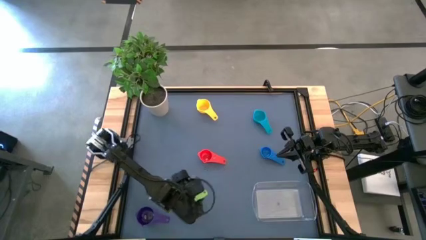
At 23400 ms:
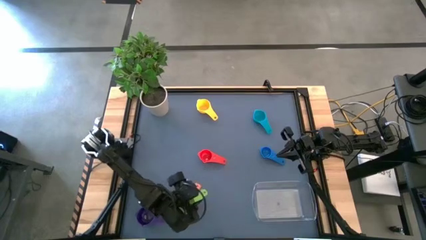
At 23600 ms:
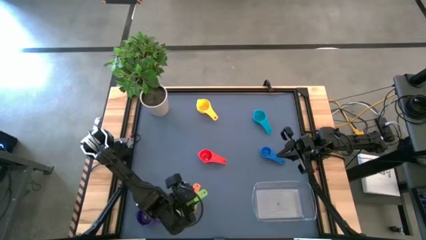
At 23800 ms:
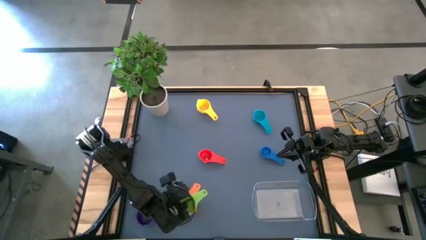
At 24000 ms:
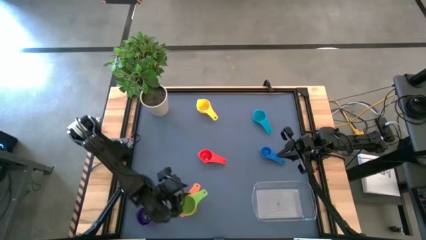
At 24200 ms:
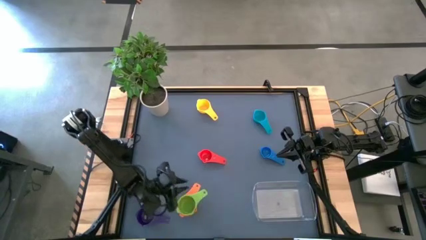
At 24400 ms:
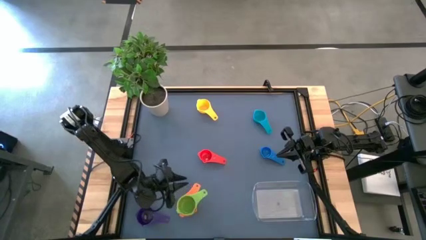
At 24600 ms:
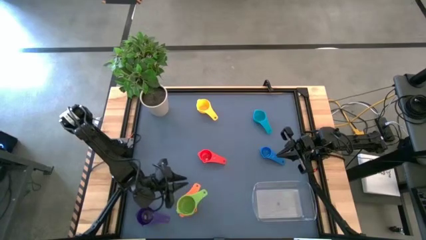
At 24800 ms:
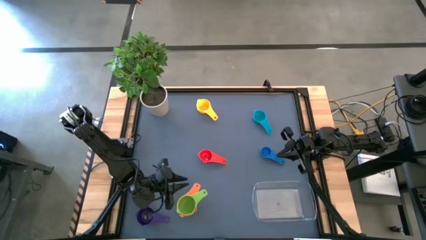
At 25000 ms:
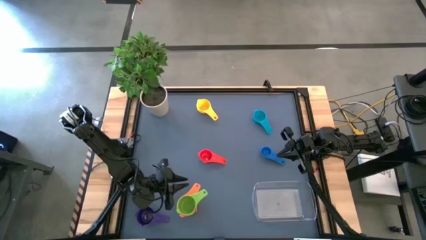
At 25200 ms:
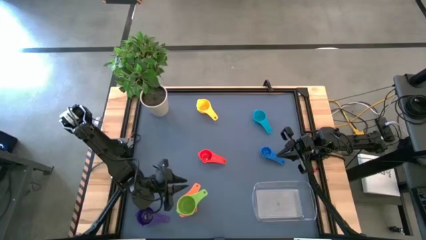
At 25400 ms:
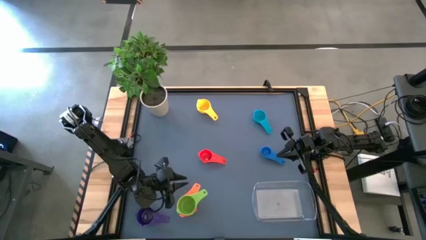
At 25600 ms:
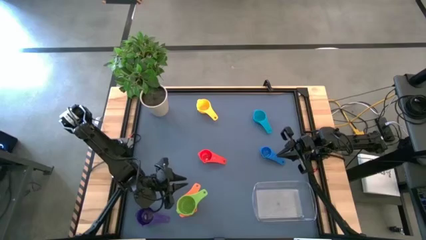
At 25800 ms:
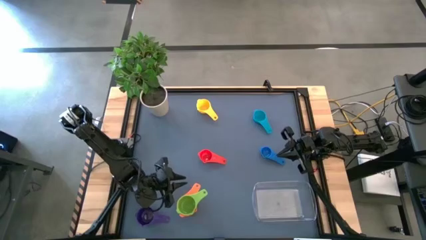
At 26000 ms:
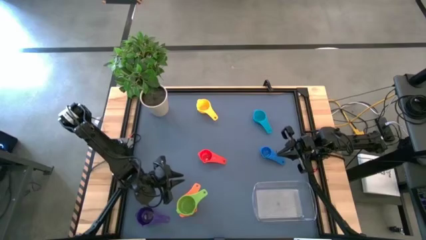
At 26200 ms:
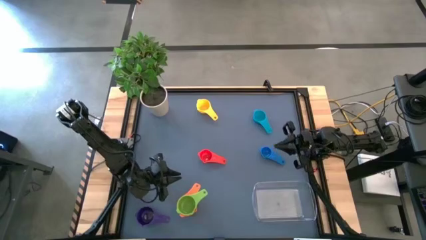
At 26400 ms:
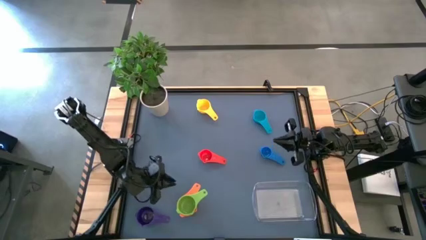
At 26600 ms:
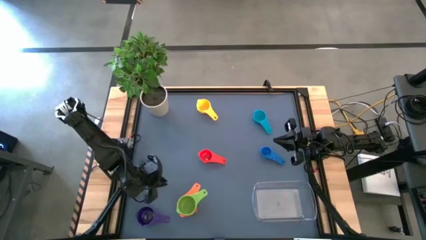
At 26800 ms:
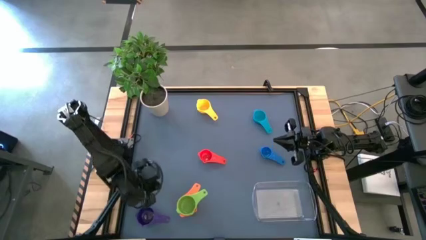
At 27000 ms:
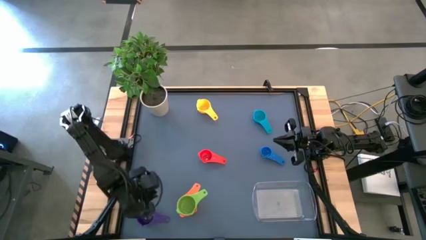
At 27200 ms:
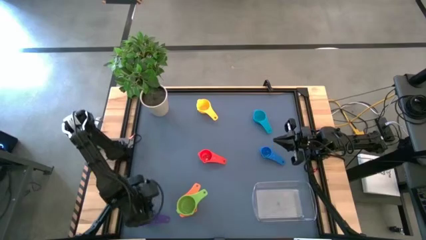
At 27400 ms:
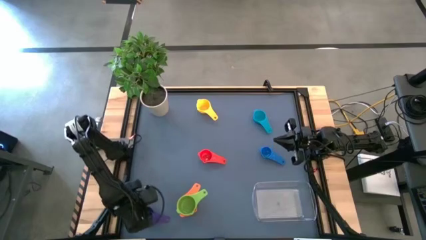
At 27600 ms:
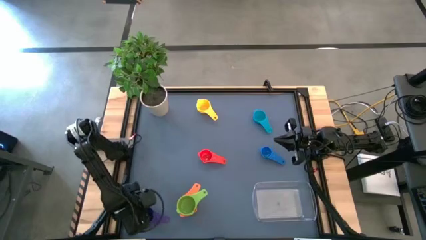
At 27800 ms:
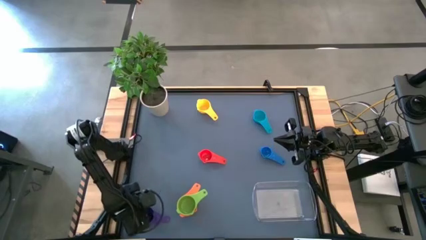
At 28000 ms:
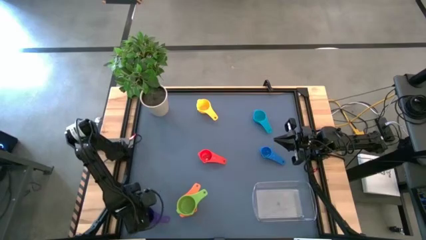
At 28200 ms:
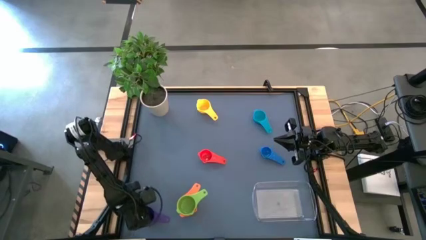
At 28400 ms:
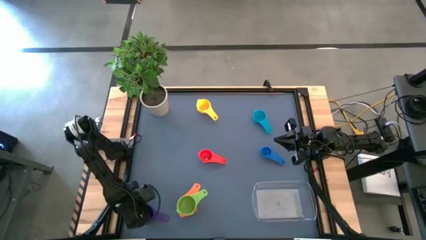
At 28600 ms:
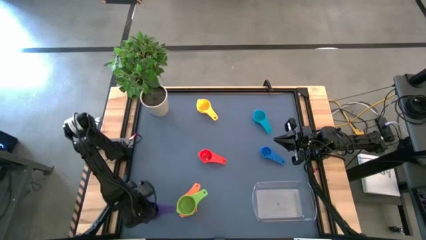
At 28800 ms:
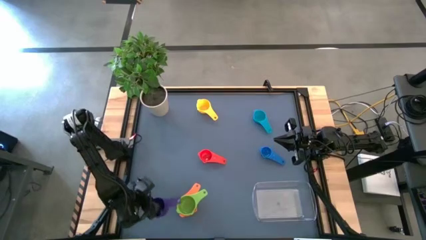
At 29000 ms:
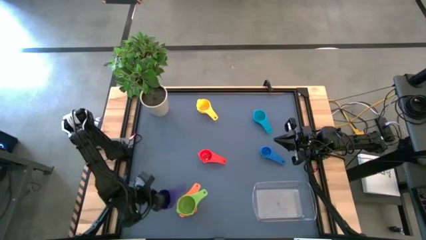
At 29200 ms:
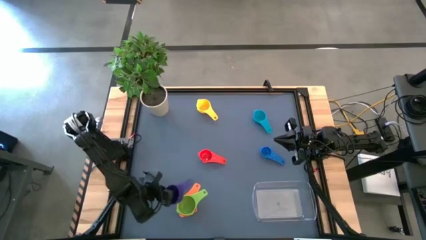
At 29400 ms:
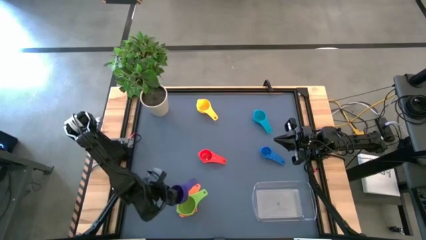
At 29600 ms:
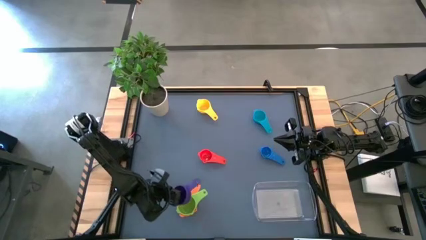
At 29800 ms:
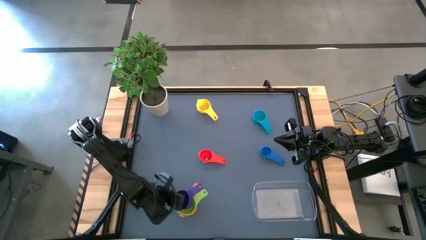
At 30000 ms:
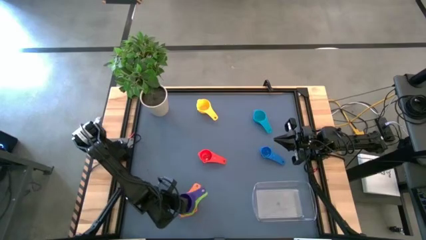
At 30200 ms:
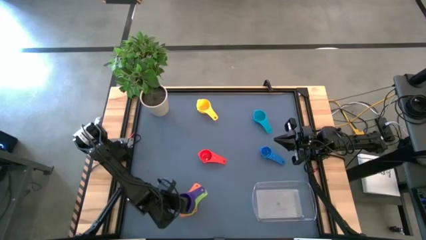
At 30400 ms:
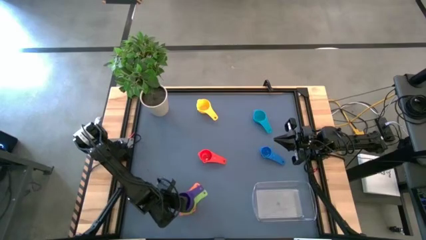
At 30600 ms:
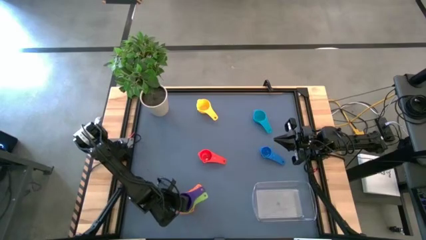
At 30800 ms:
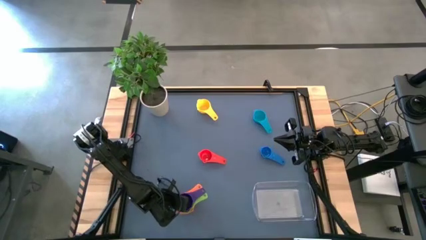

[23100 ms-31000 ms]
Task: Nest measuring cups in basket
Stack the purple nest measuring cup into the green nest measuring cup

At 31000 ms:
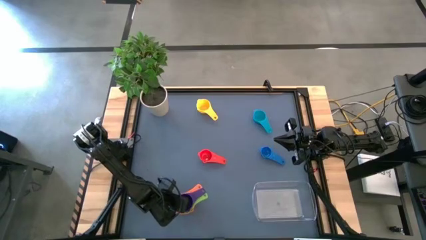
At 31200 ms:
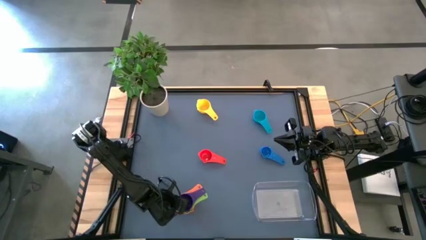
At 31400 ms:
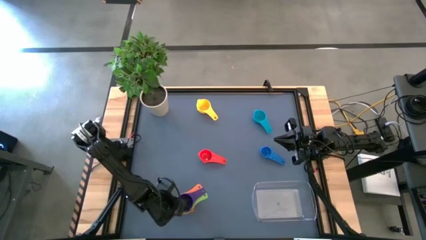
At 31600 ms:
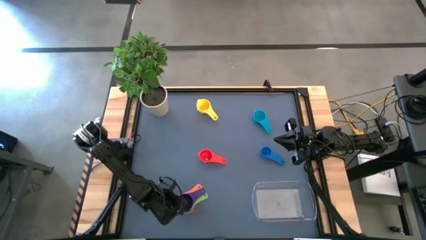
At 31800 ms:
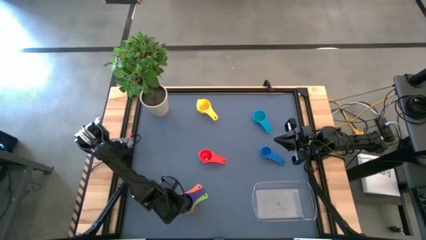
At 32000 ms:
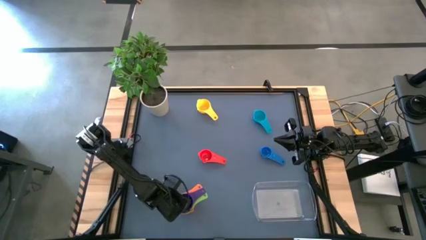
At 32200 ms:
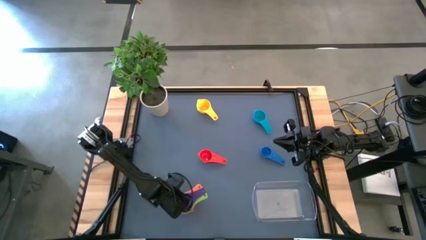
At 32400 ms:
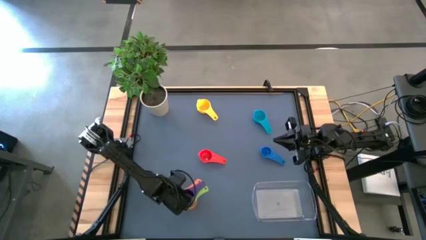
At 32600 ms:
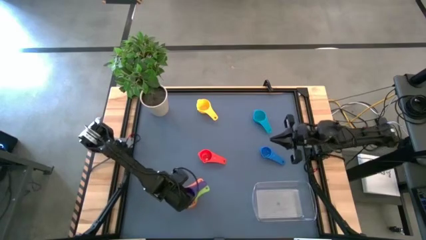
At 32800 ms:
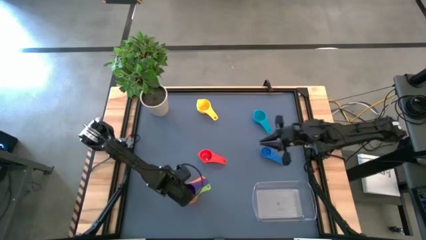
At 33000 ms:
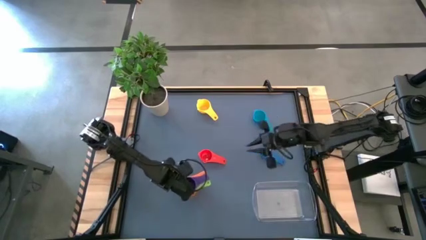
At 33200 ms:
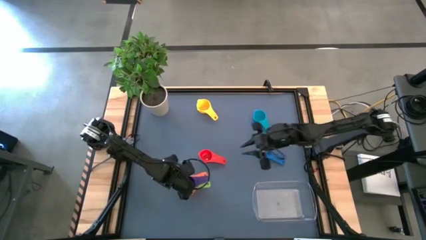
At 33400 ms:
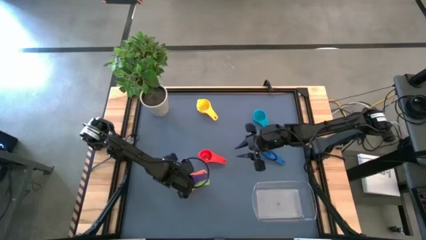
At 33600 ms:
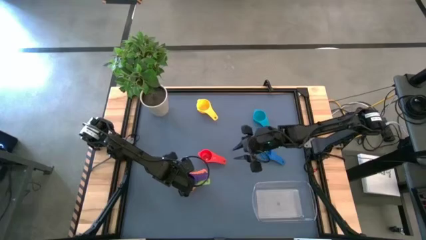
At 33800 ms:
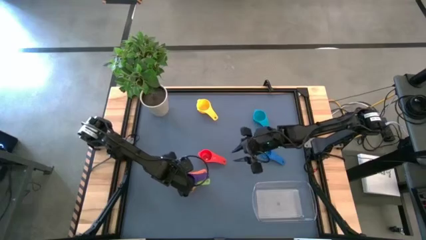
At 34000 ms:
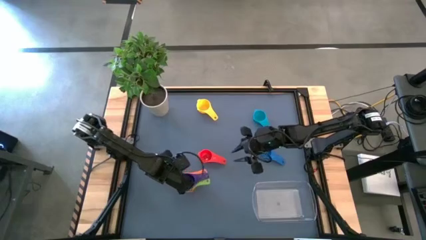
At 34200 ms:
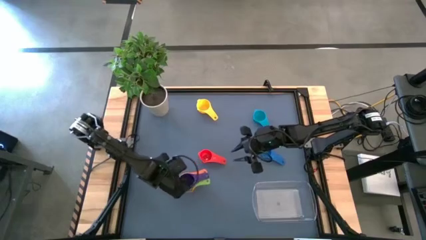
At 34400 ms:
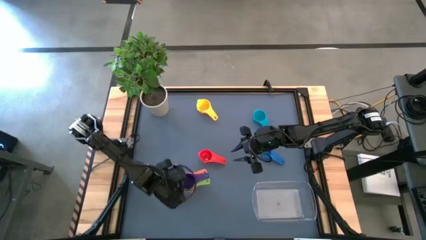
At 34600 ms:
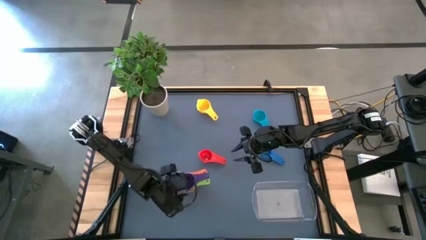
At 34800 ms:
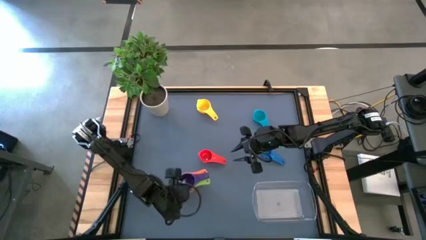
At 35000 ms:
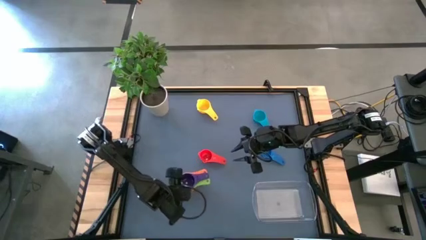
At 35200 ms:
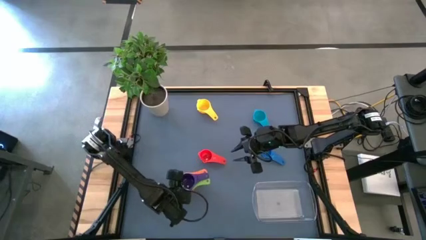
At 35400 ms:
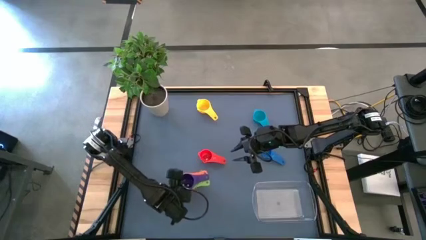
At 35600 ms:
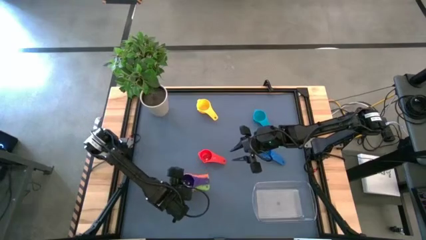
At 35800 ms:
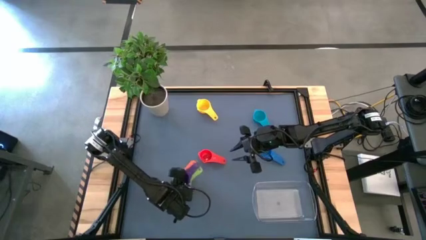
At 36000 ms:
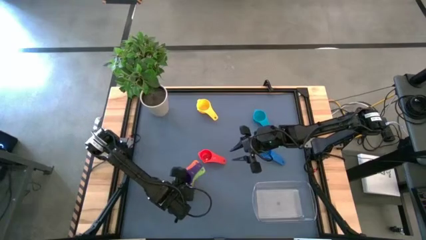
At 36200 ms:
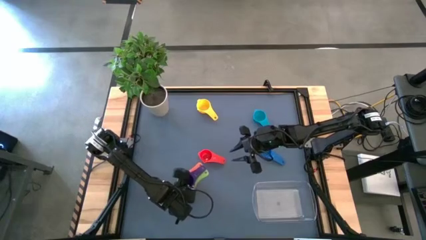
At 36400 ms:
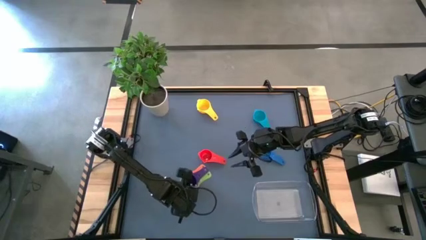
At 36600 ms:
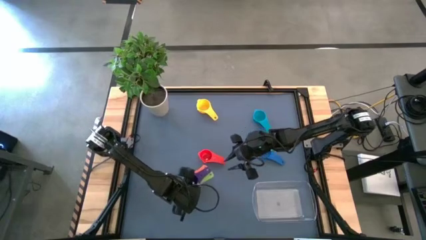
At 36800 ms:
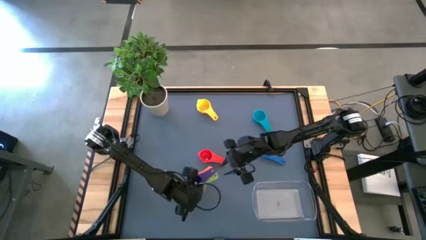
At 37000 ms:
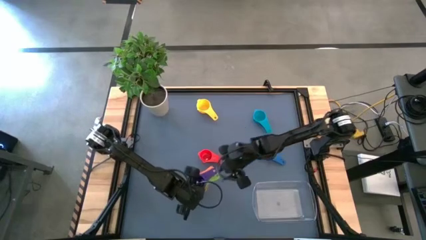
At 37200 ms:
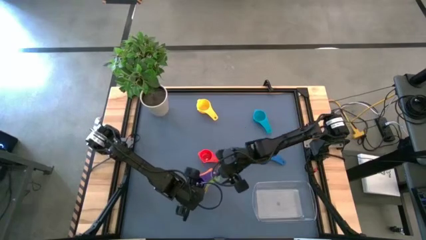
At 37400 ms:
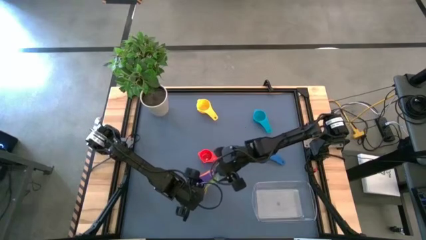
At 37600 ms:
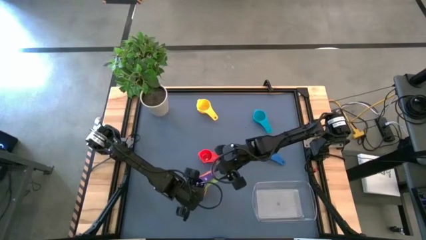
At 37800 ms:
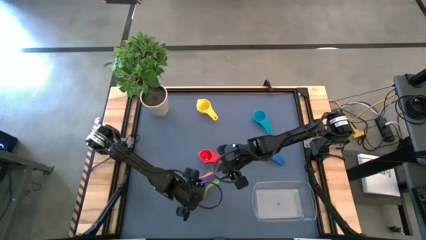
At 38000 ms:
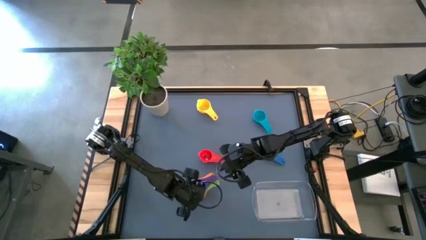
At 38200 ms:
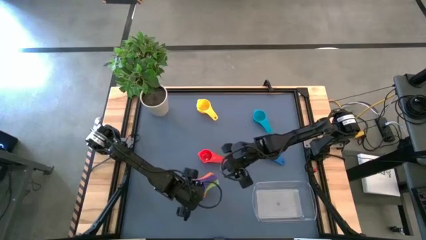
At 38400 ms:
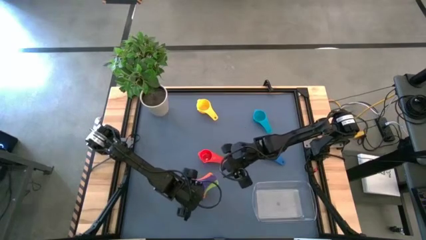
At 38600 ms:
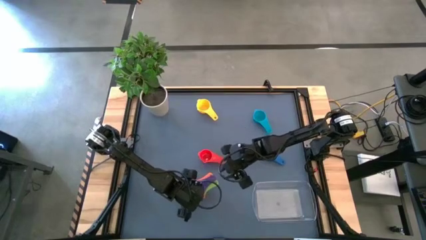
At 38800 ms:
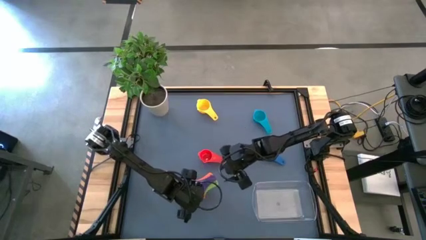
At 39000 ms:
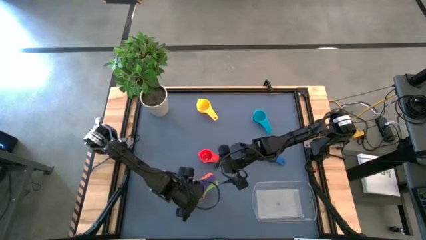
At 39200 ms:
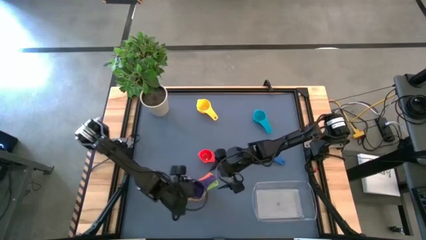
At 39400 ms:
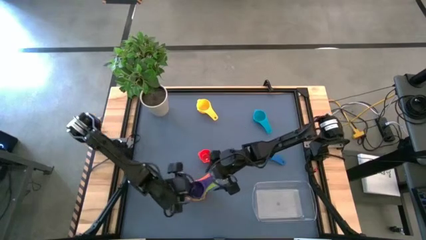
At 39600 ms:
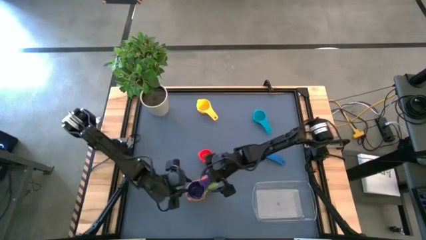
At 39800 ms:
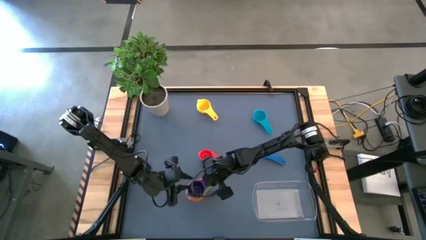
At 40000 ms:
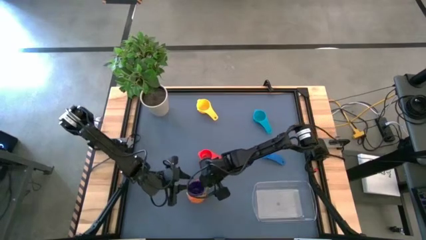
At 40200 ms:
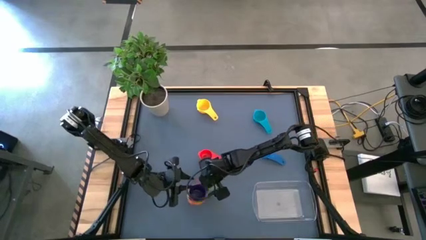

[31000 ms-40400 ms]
Move the stacked nesting measuring cups to the top middle of the table
